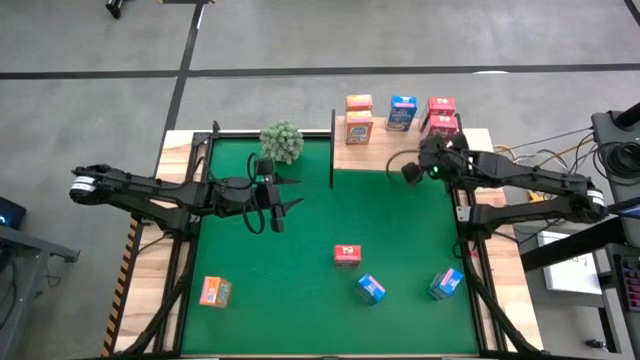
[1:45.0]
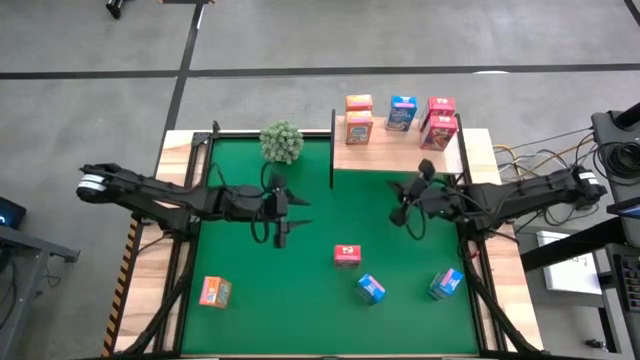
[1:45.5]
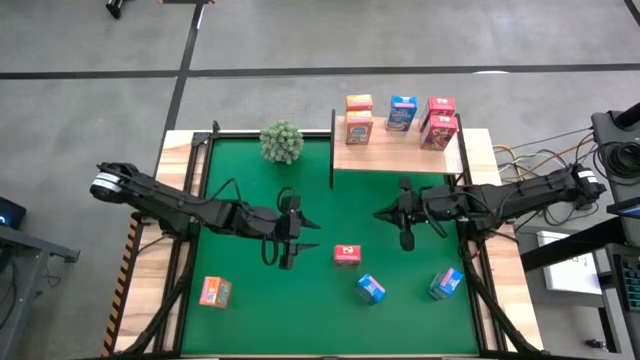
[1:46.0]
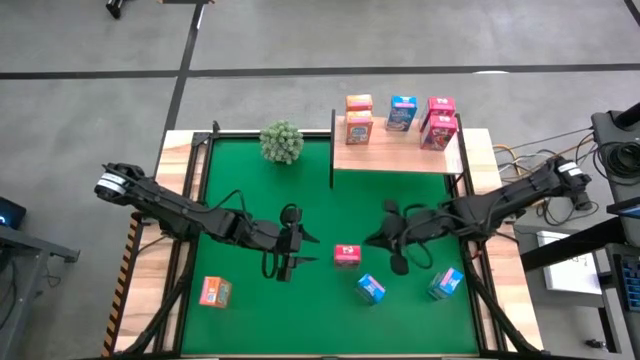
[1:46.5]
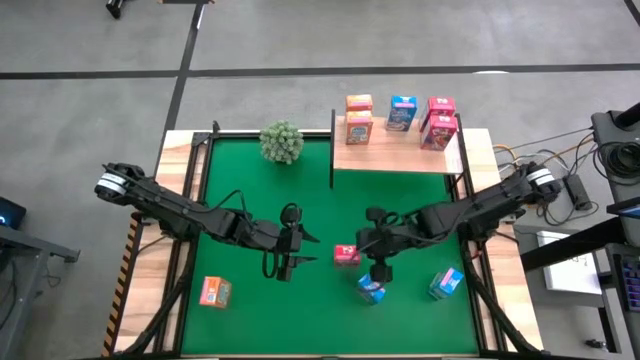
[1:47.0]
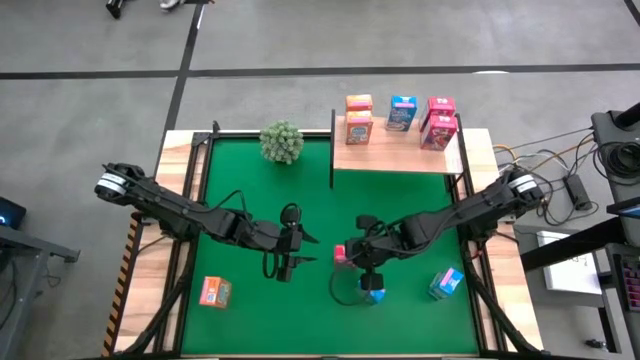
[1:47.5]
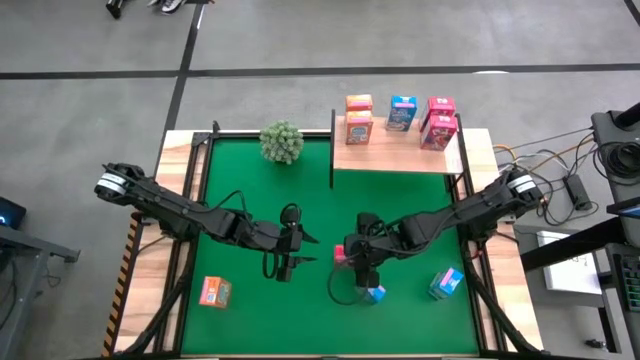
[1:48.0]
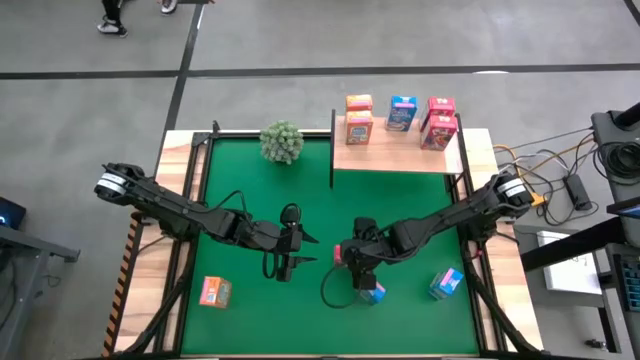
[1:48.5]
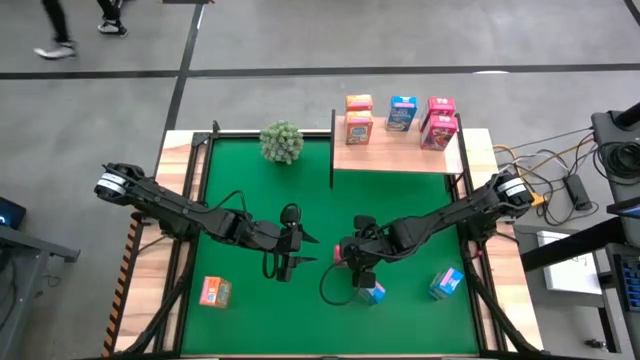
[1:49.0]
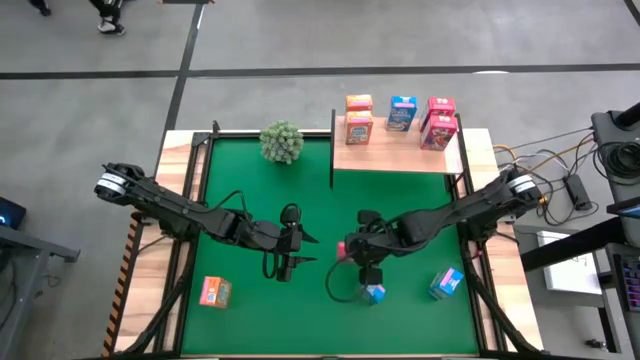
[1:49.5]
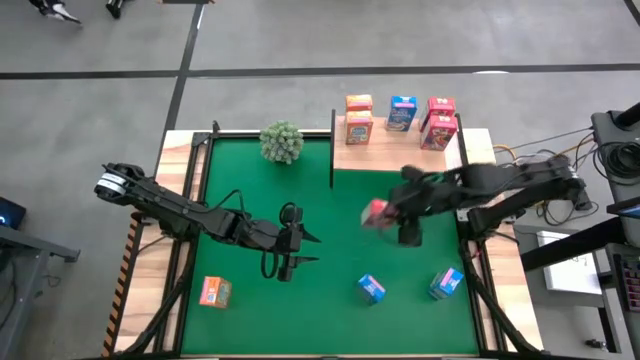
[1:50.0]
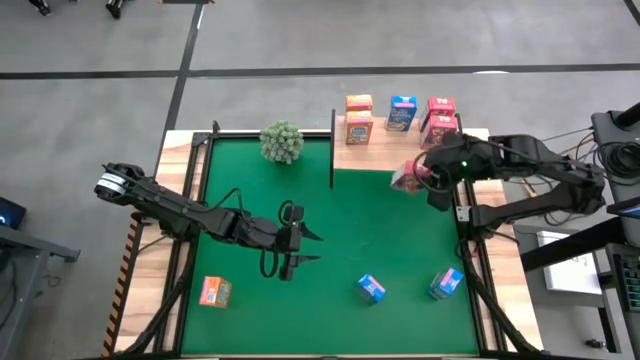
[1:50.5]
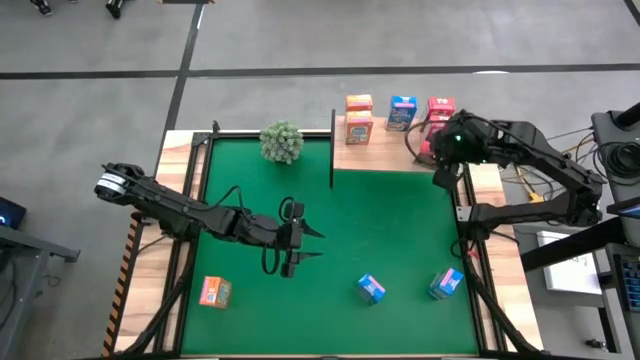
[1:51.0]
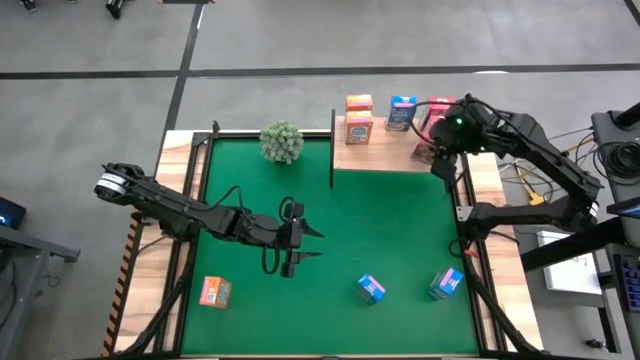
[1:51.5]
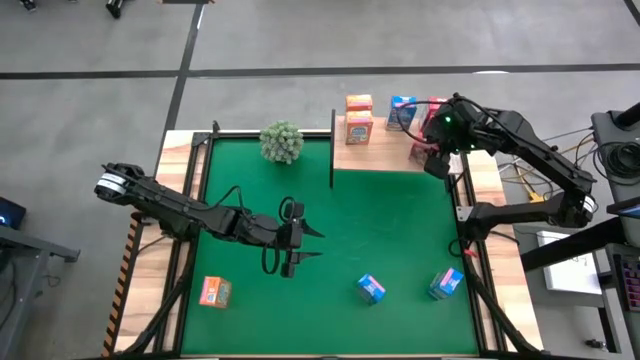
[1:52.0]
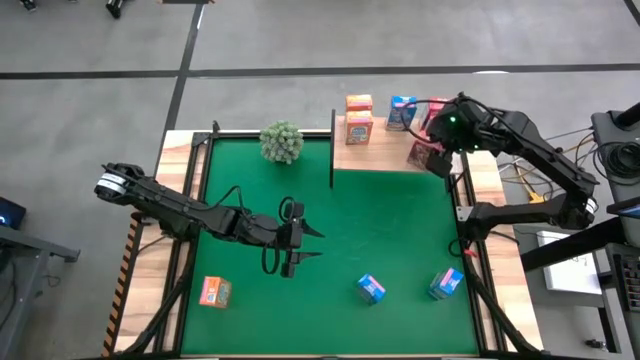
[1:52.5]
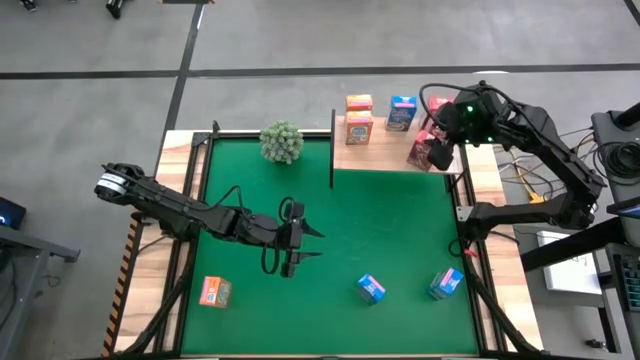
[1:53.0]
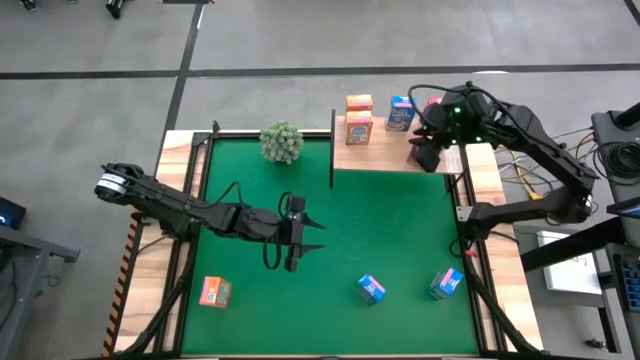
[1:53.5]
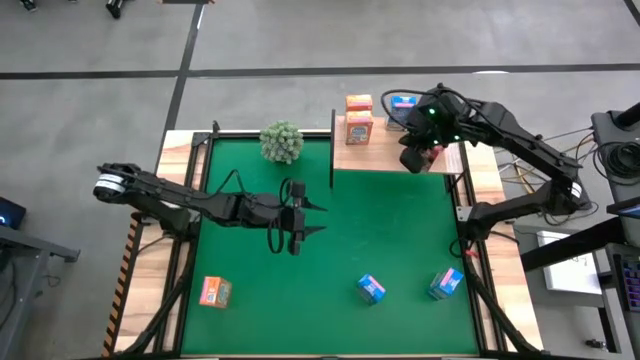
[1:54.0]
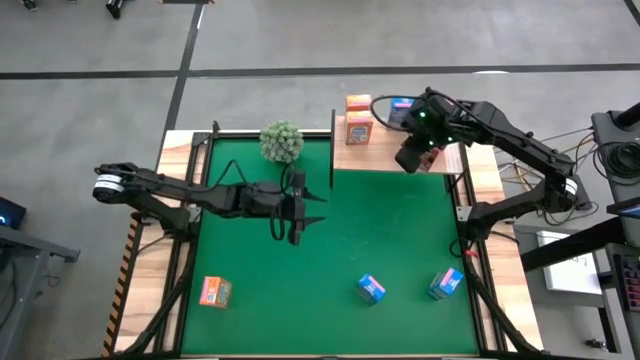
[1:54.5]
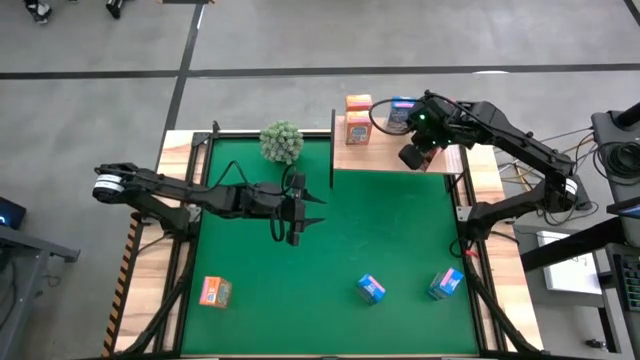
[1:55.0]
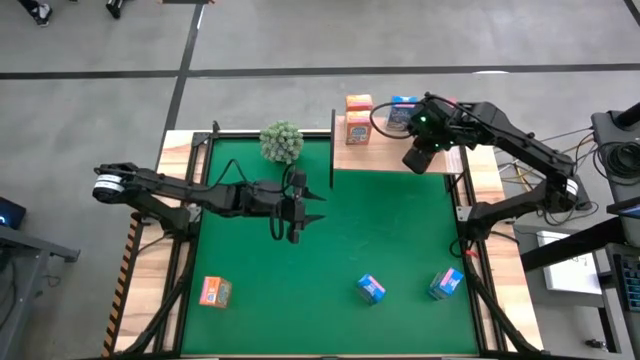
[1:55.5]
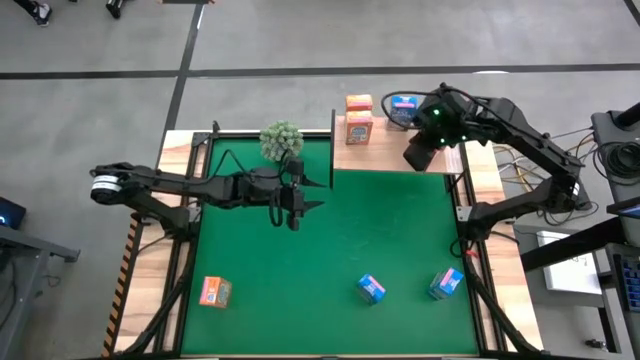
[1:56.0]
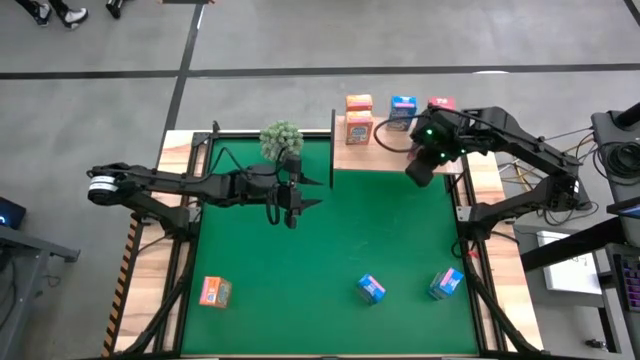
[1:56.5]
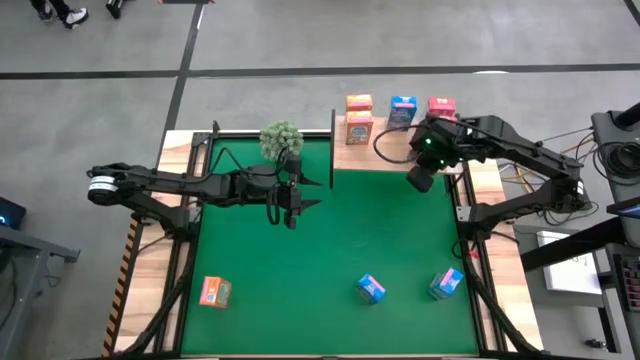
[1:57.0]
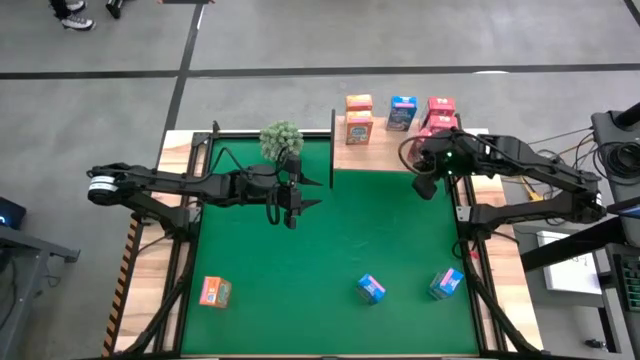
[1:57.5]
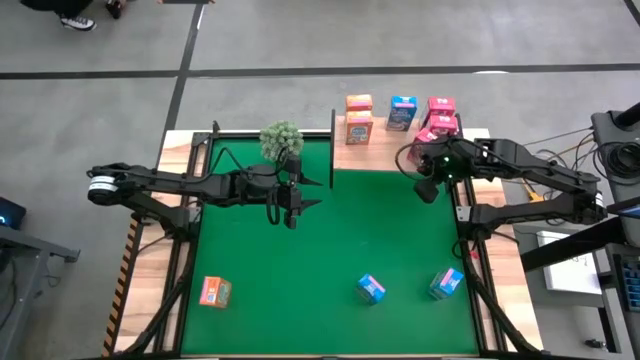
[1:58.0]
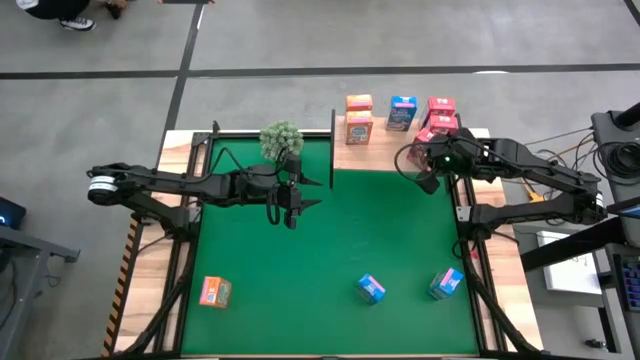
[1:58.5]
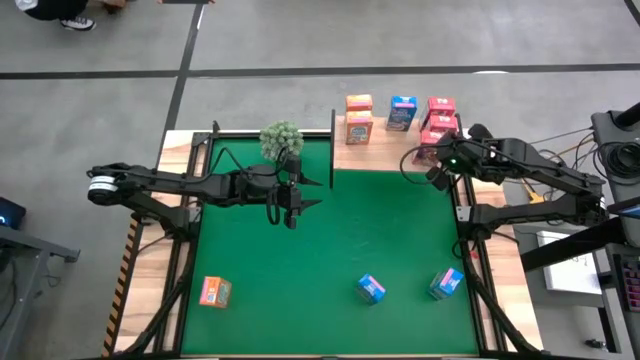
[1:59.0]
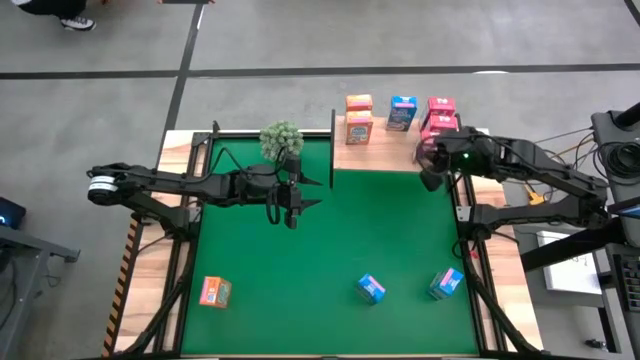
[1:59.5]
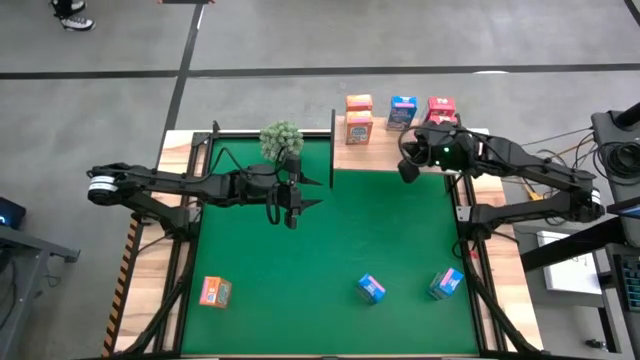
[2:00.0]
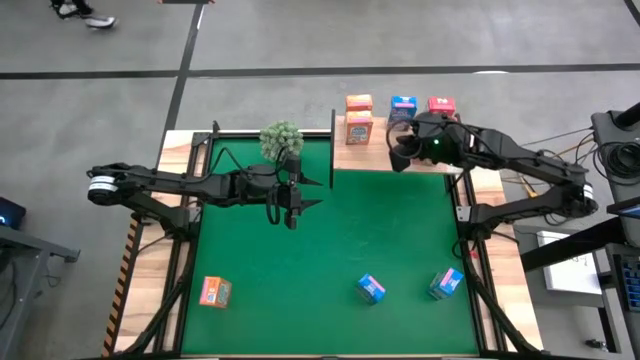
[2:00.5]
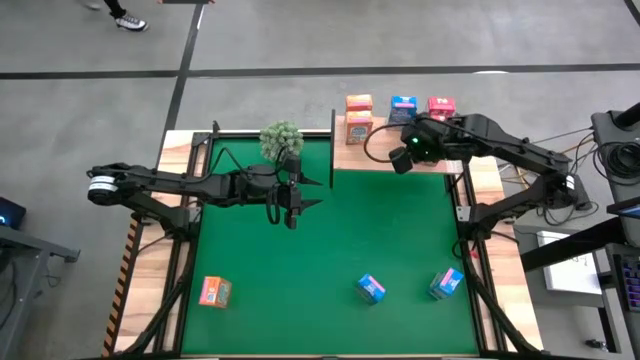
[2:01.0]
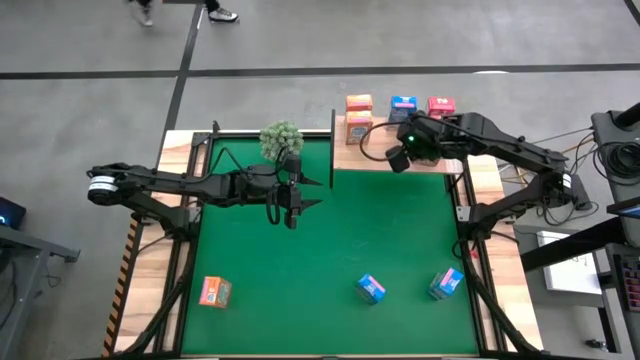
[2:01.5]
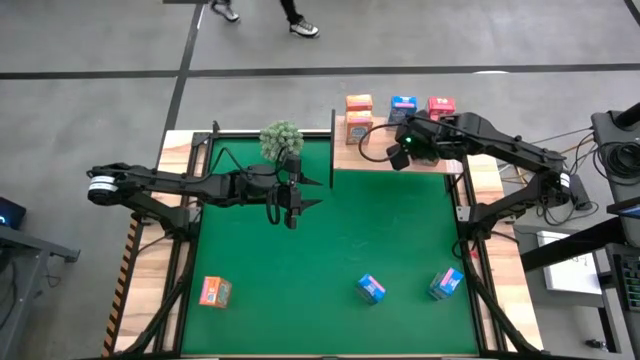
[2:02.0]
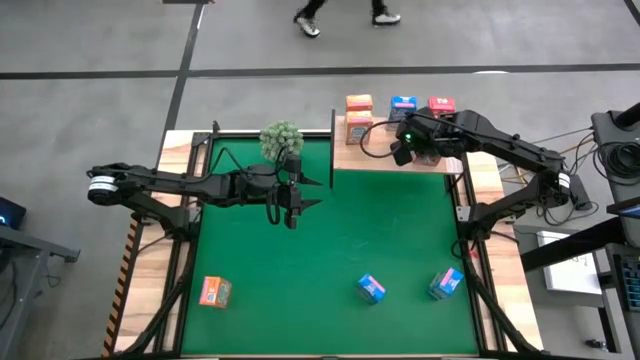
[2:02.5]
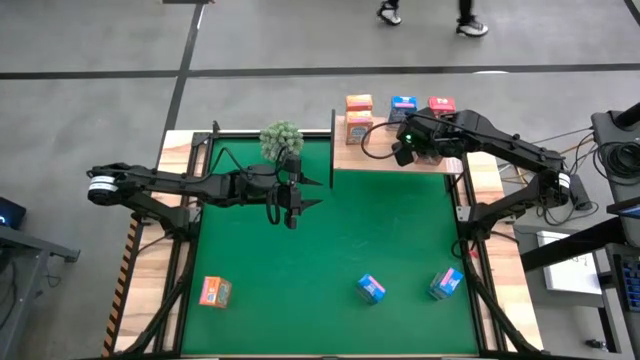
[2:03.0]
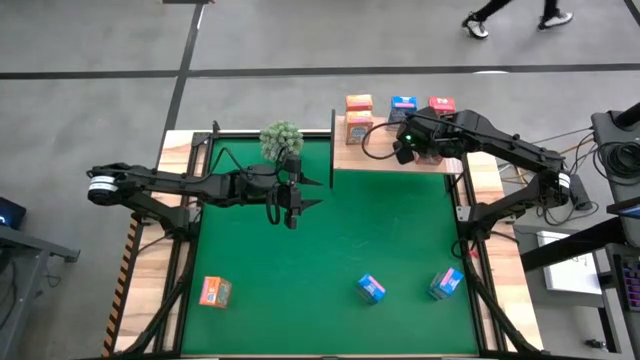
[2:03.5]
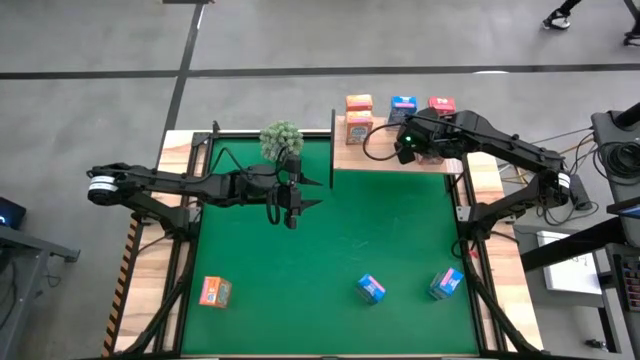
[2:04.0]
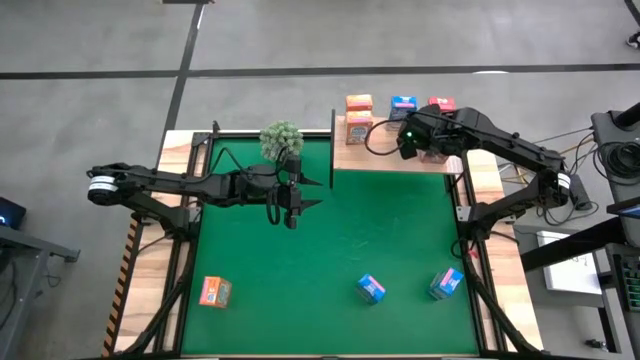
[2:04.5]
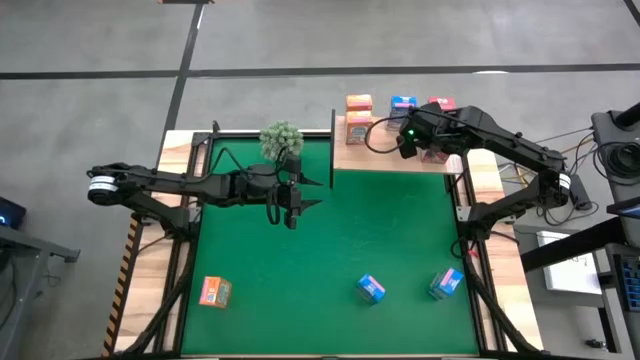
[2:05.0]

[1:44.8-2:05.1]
Task: Stack cereal on shelf
Put the red cereal box on the shelf

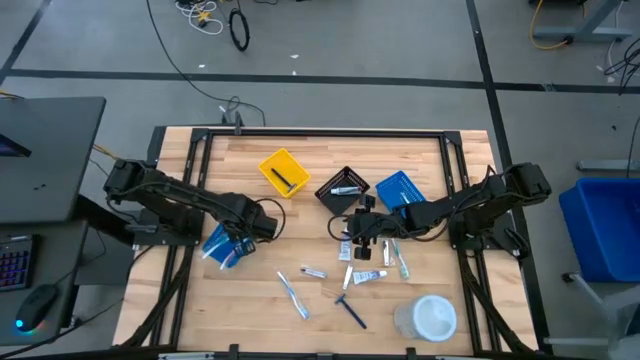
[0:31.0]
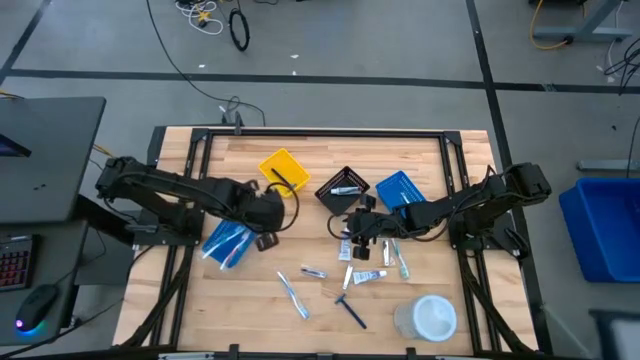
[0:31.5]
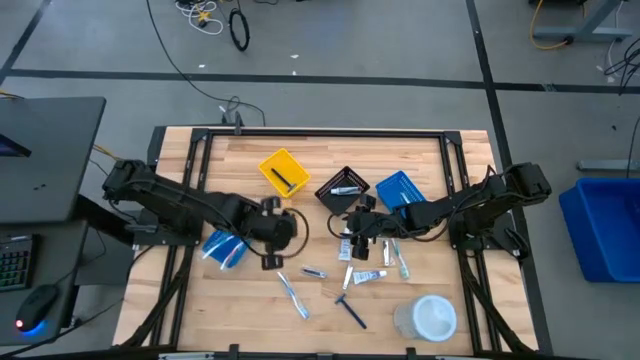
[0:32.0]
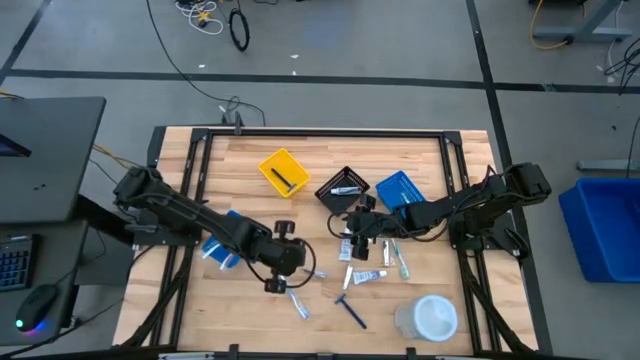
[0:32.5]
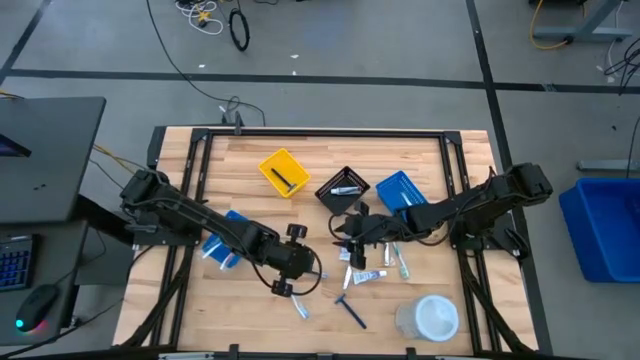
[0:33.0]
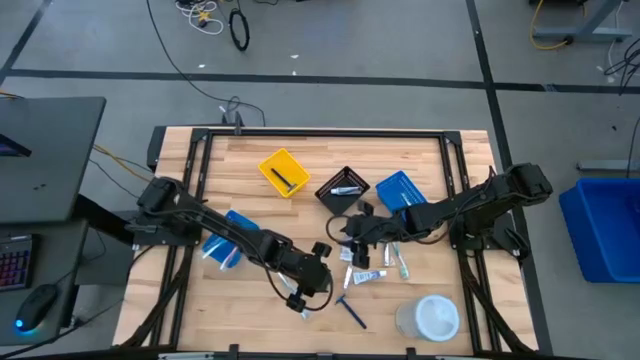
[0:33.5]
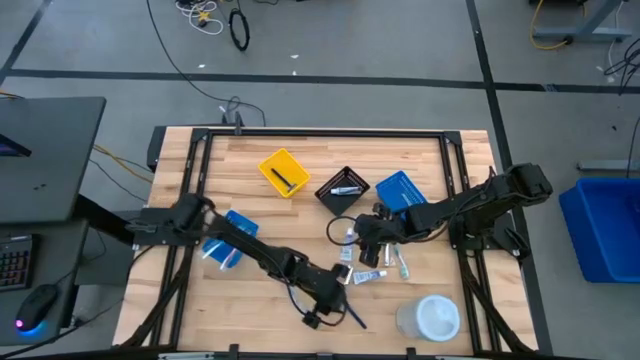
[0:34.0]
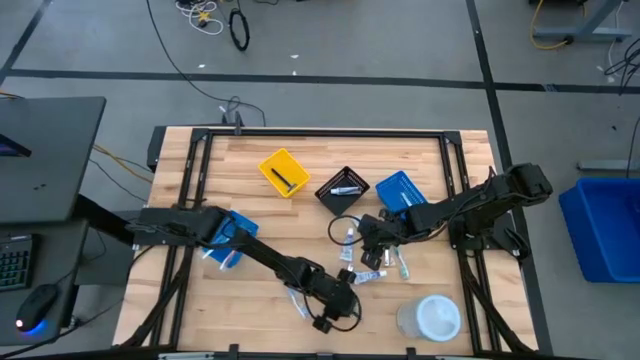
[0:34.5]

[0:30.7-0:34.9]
Task: Pick & Place Travel size toiletries
Put the blue razor into the yellow bin
